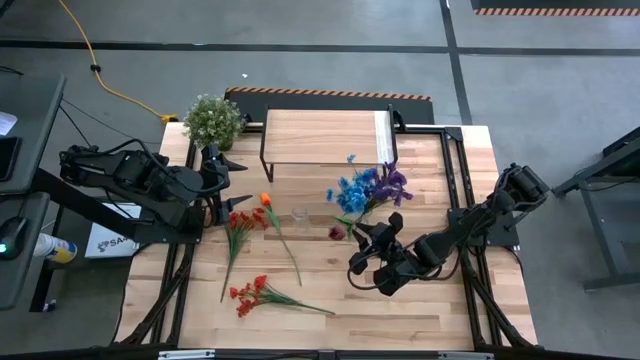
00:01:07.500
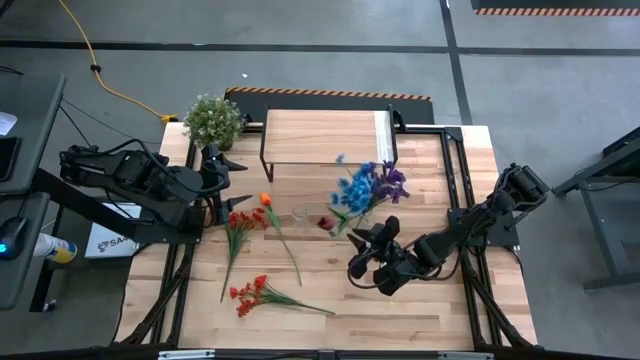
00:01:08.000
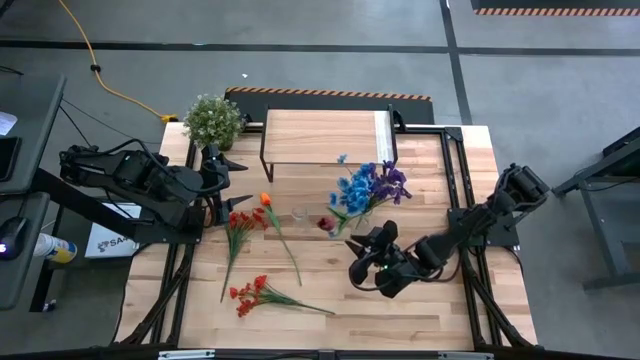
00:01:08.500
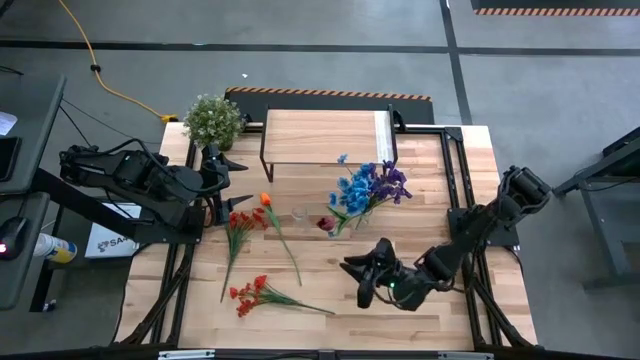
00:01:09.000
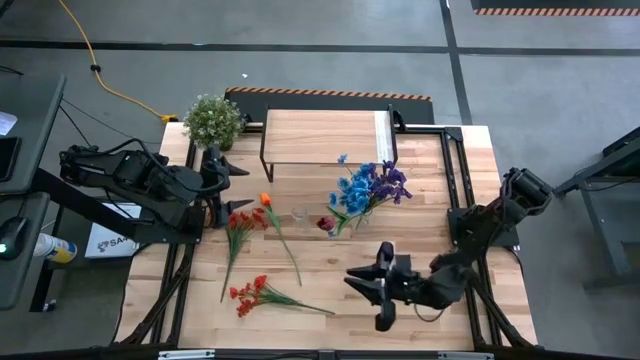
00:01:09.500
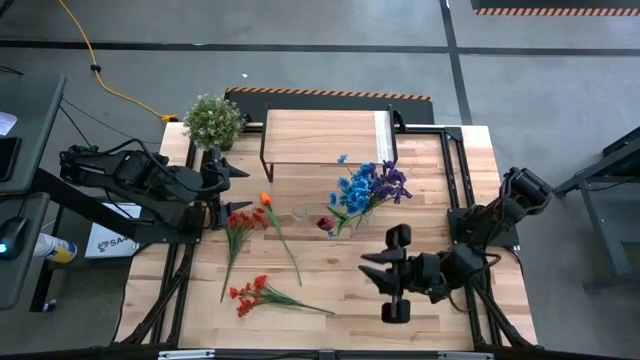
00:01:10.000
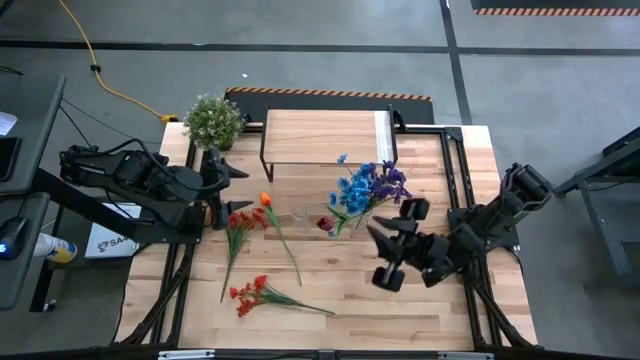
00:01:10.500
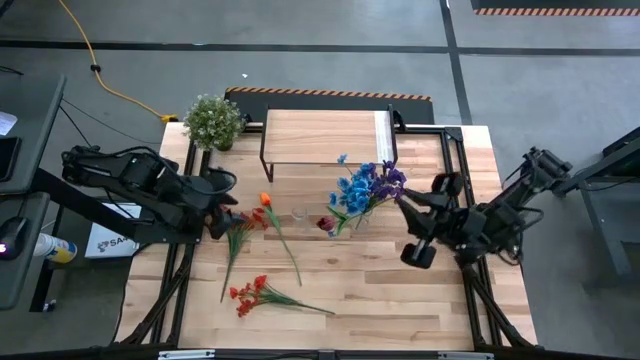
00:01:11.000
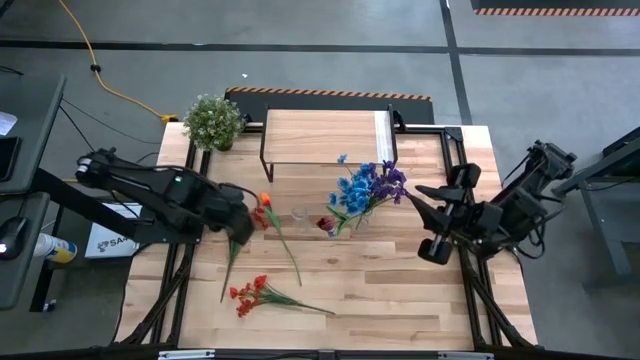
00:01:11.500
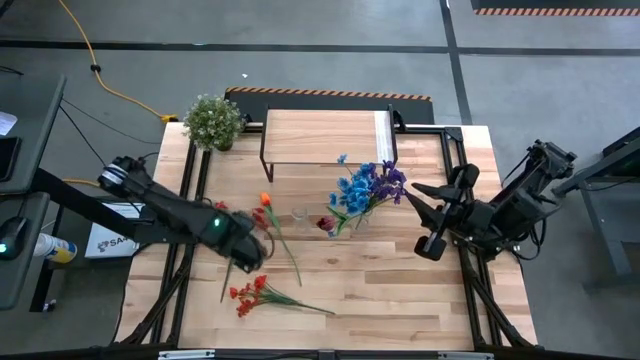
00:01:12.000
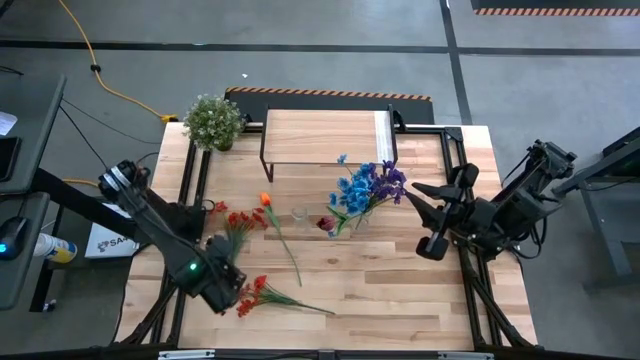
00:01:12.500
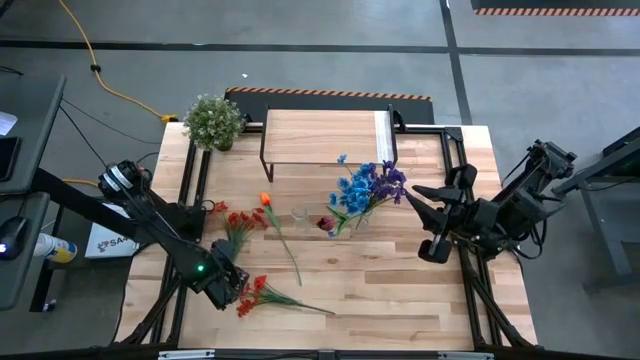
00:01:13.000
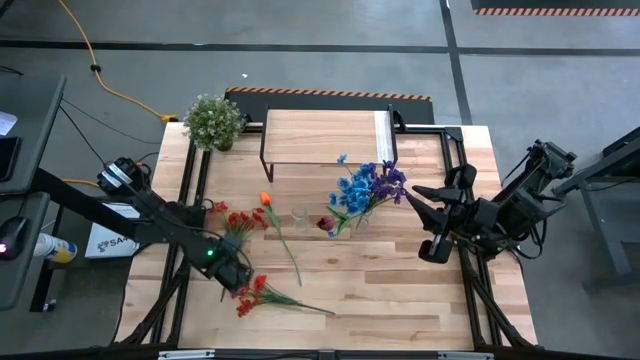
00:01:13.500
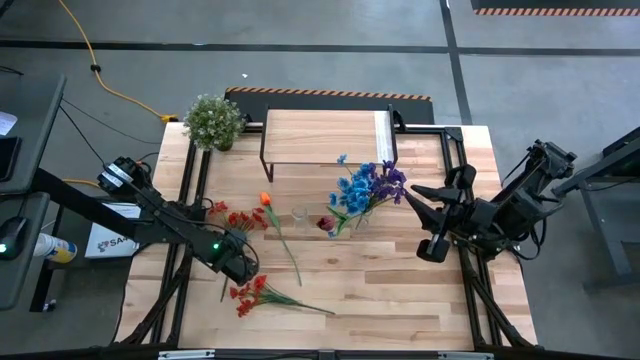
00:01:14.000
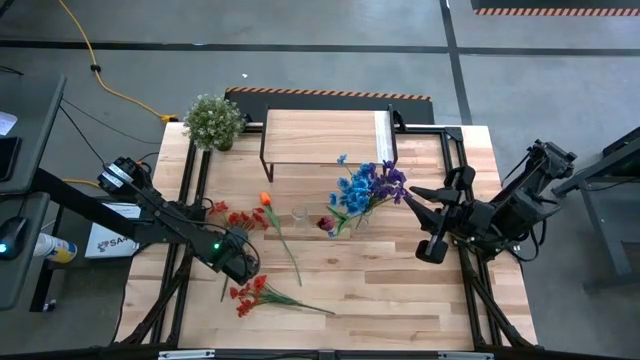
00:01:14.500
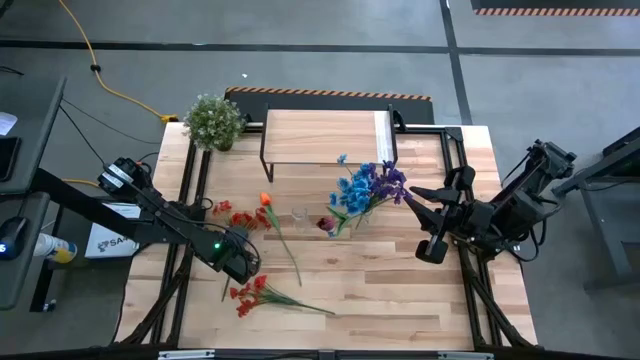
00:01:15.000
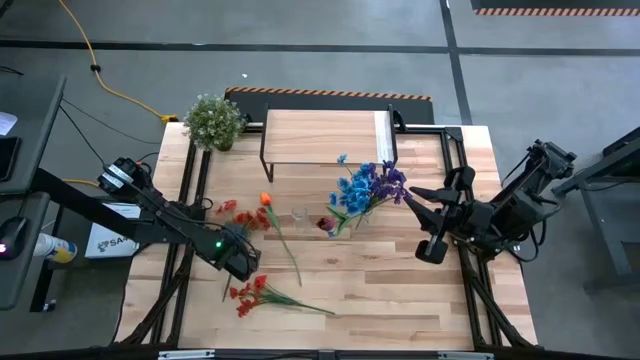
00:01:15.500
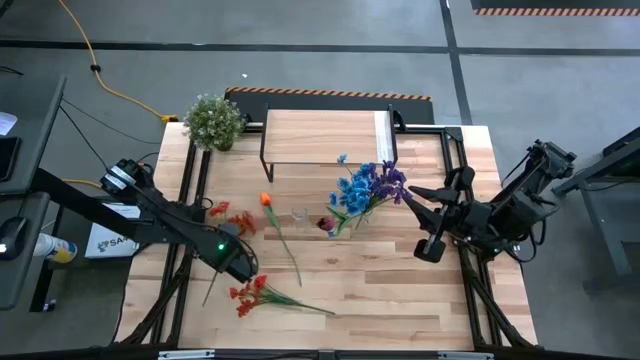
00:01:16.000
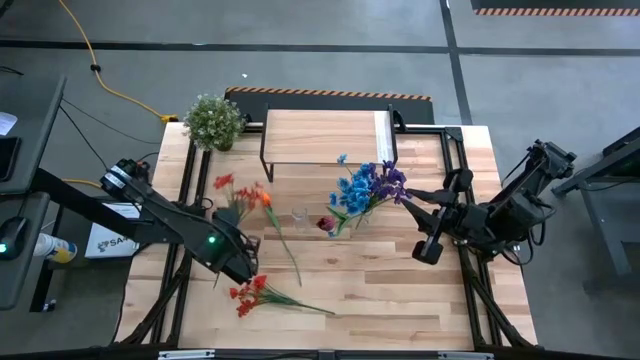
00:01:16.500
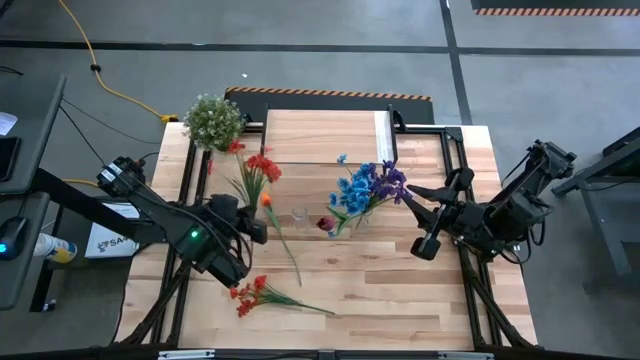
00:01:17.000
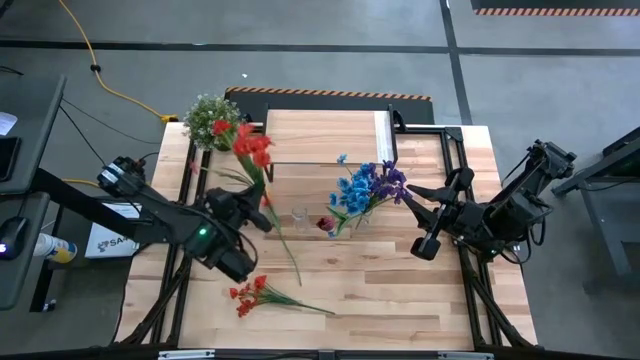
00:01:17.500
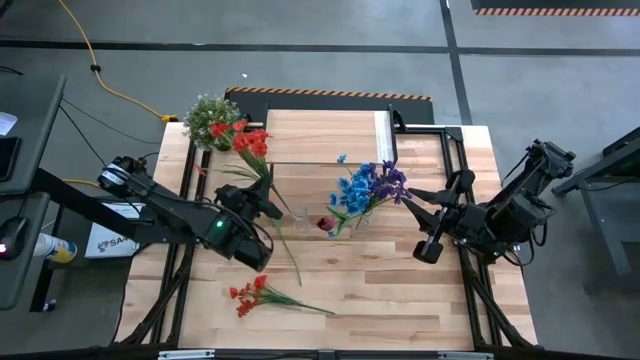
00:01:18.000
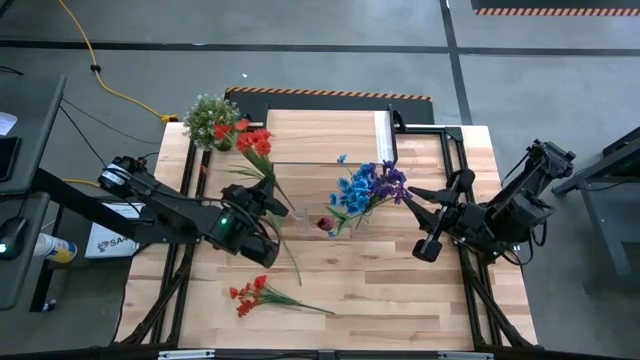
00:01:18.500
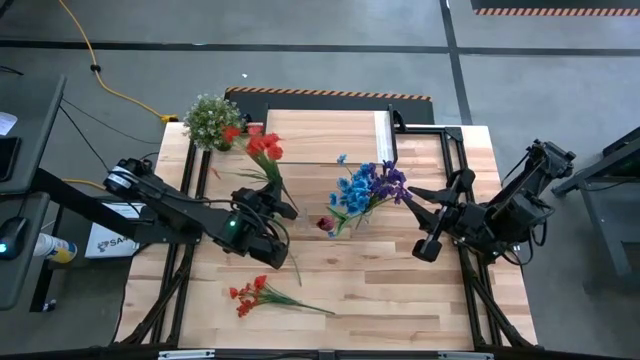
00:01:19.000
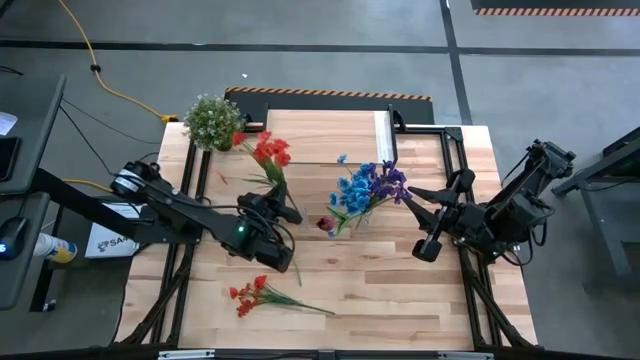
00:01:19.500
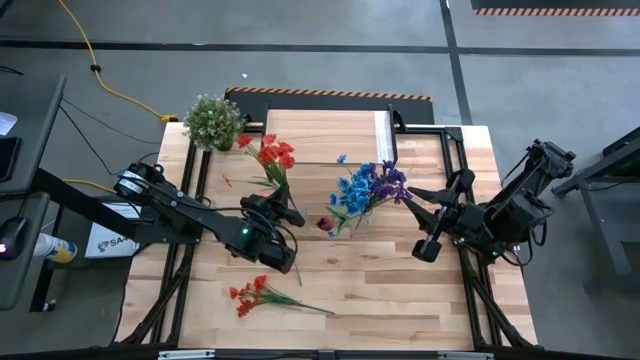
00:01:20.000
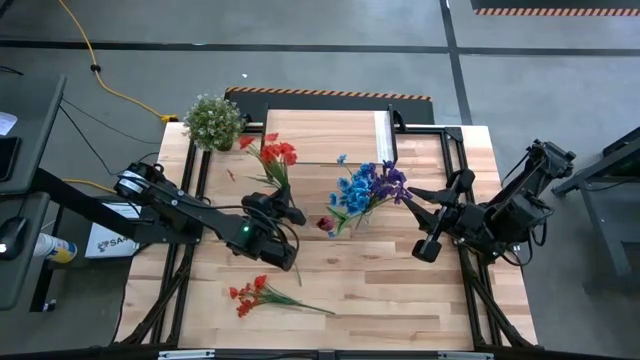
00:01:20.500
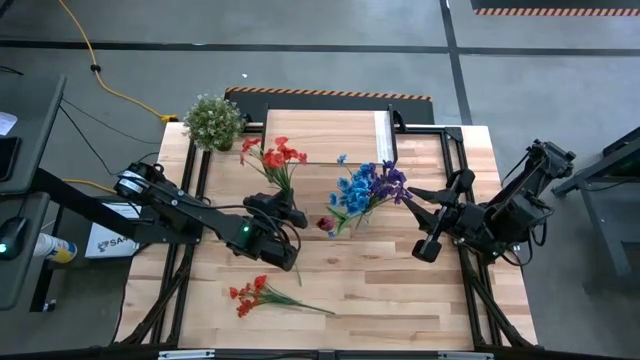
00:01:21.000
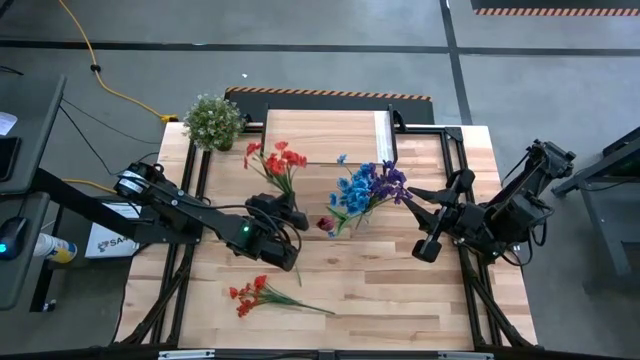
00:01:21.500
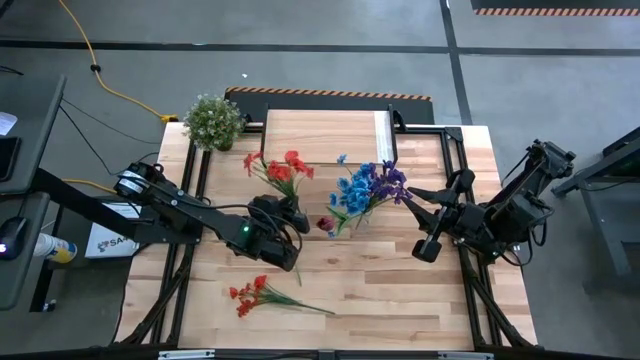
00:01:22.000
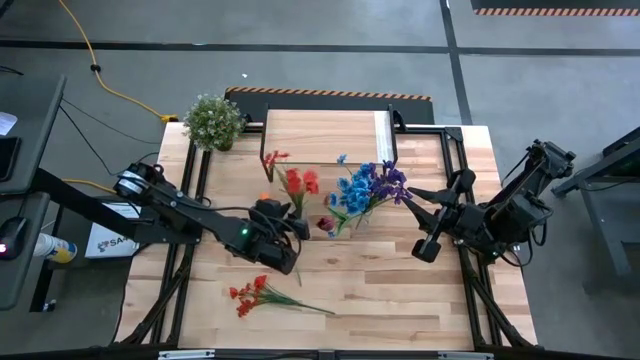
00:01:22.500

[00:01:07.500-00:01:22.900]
Task: Pick and place flowers into a vace then onto a shelf
Put the top red flowers into the left transparent vase

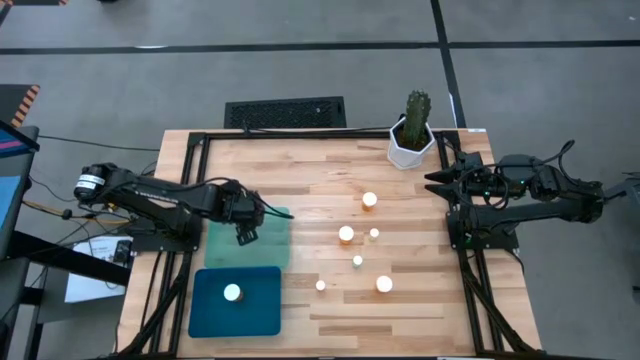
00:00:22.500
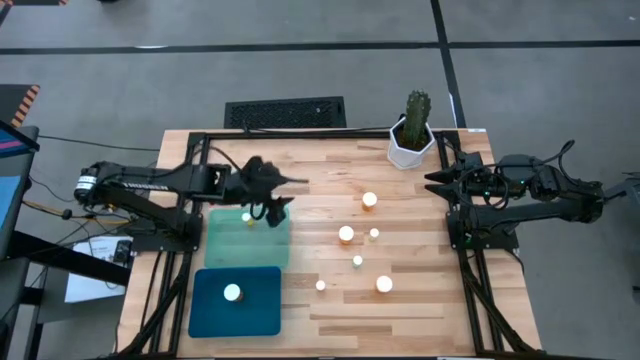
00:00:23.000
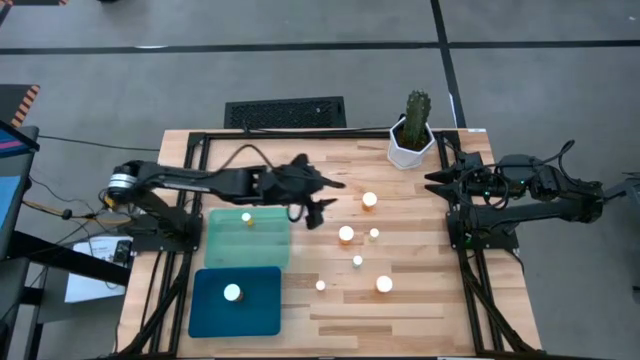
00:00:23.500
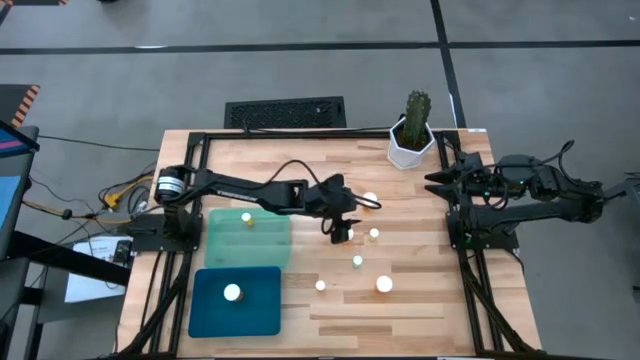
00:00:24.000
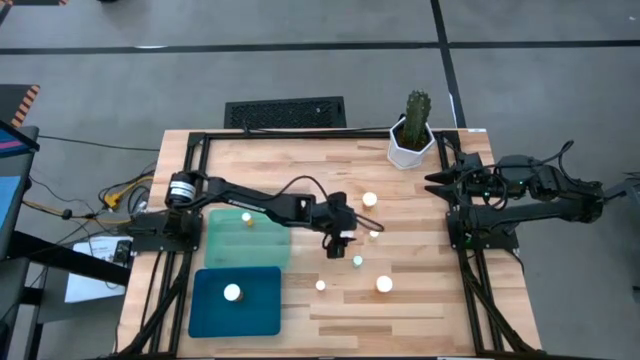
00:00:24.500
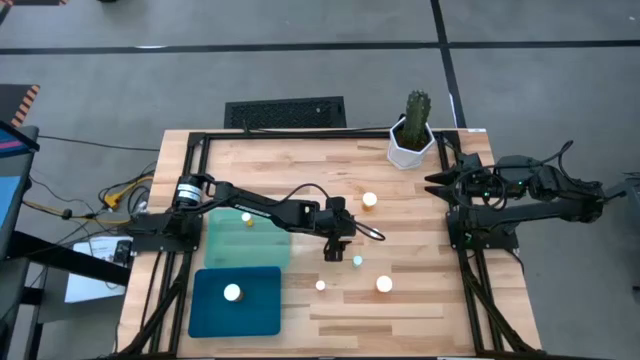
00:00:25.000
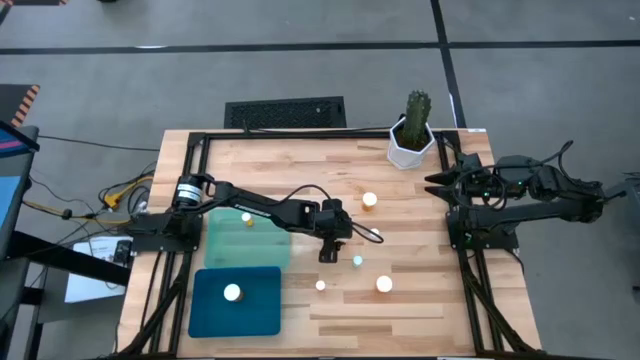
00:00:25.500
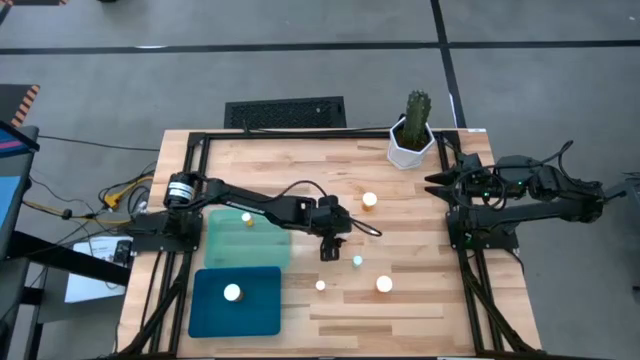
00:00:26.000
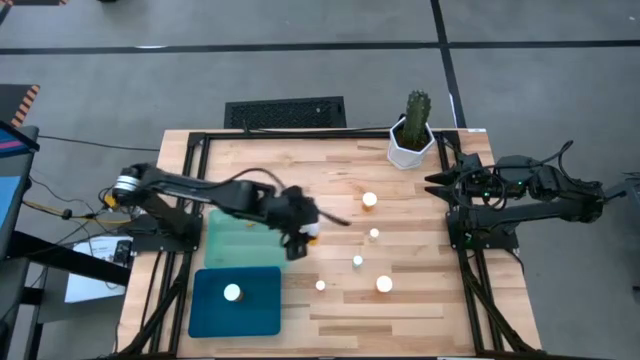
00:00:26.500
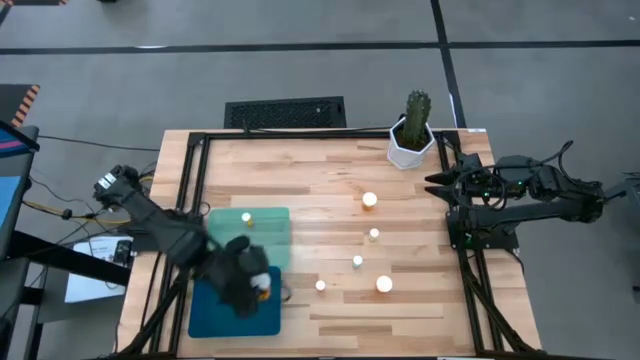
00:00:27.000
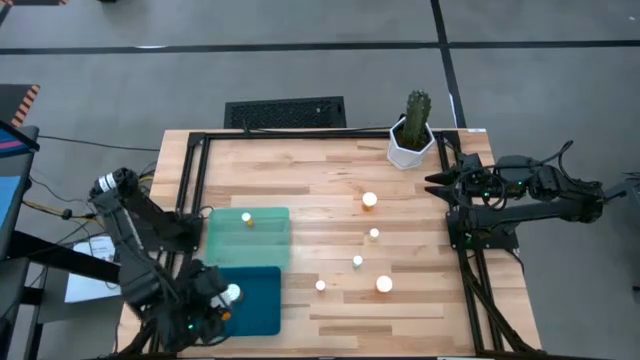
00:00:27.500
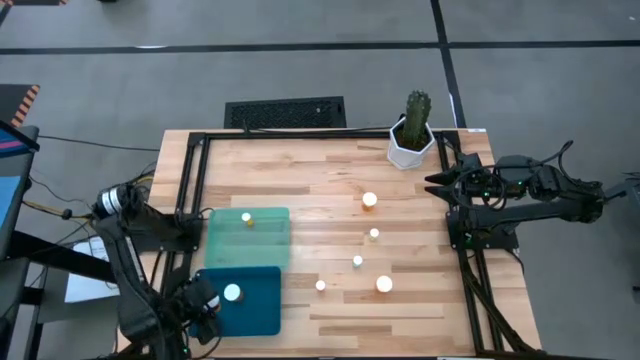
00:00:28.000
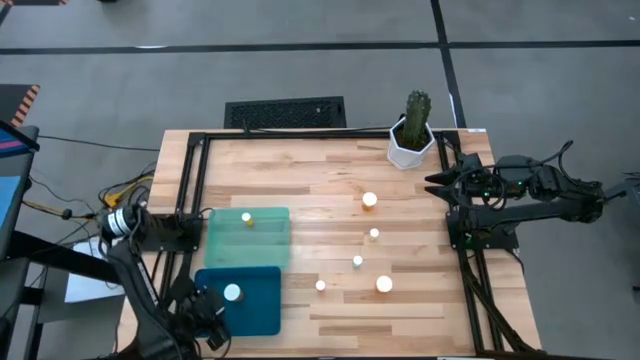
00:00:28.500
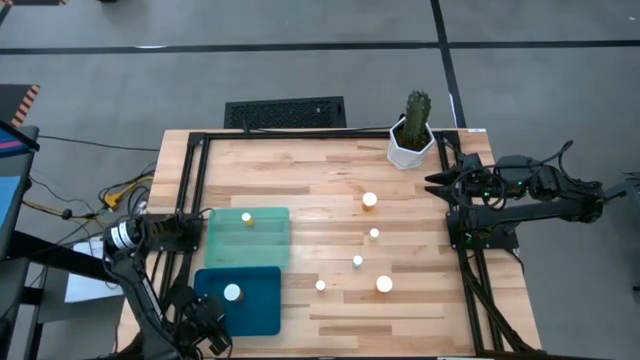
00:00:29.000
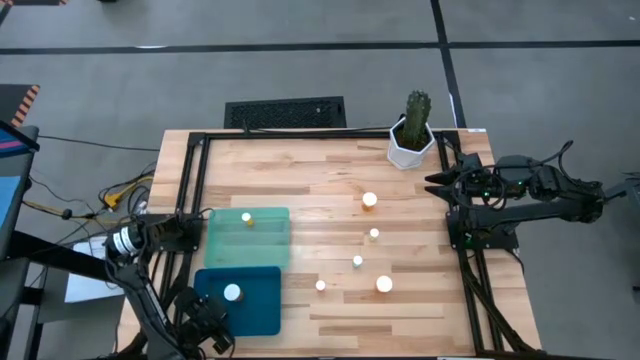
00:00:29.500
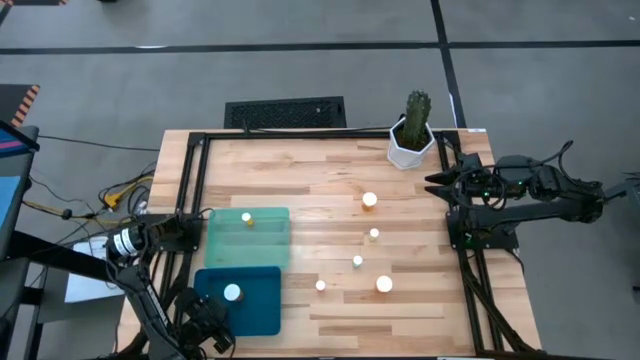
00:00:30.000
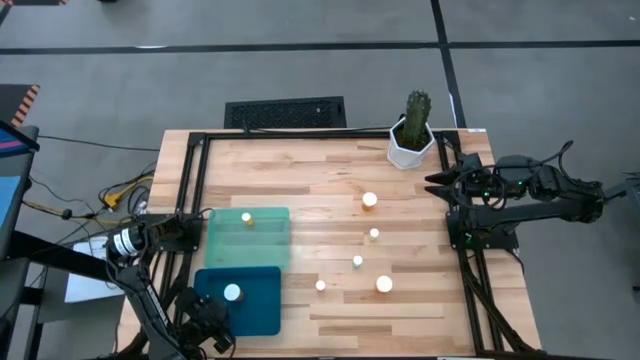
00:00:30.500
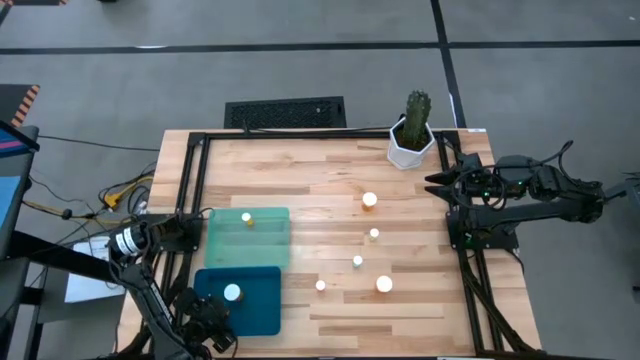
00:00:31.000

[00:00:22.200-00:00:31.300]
Task: Pick and place medicine bottles into bin by pill shape (circle, oval)
Put the center big orange pill bottle into the blue bin
